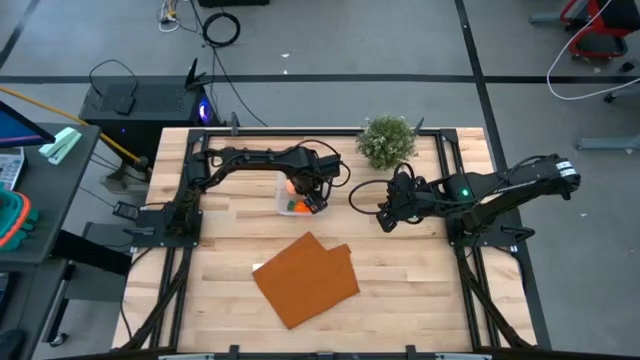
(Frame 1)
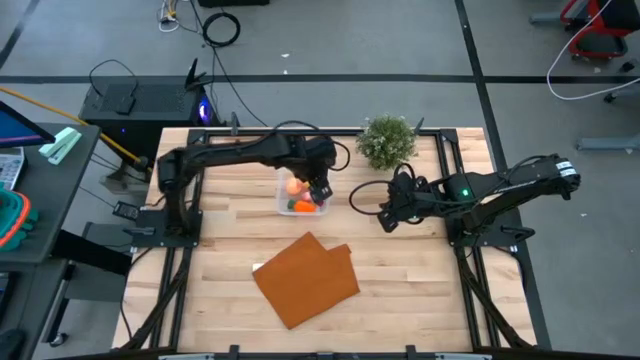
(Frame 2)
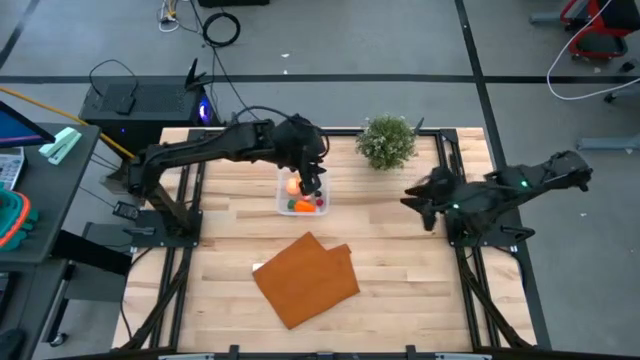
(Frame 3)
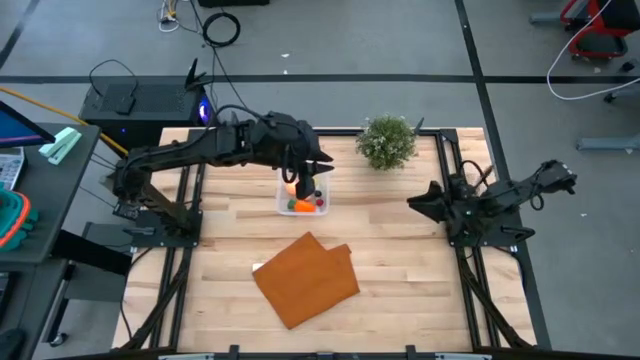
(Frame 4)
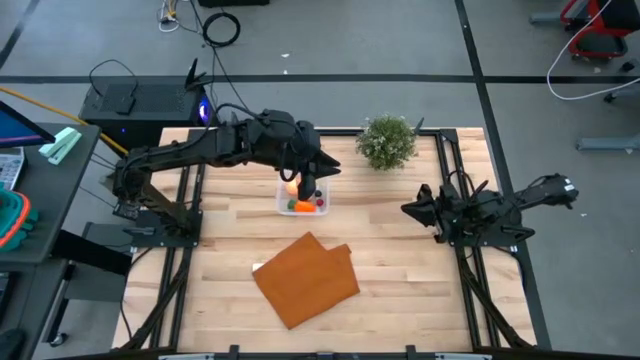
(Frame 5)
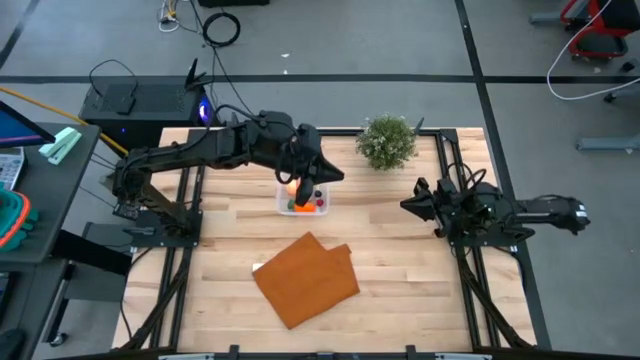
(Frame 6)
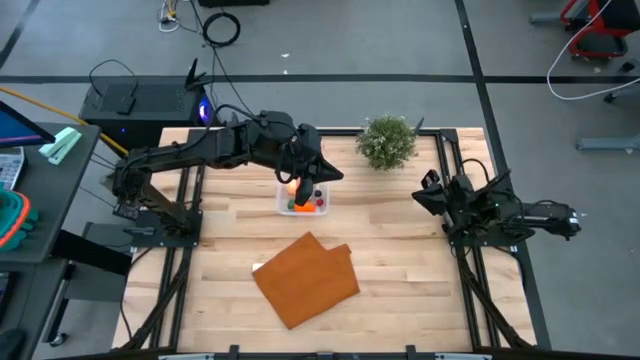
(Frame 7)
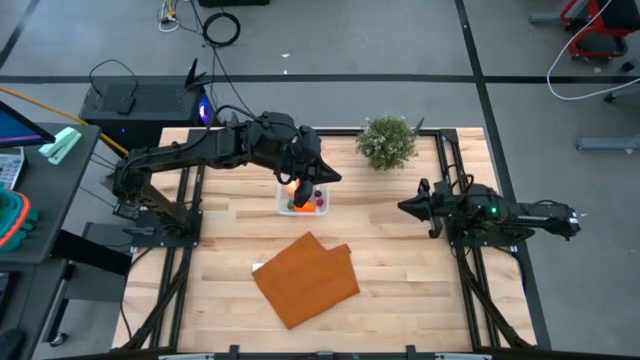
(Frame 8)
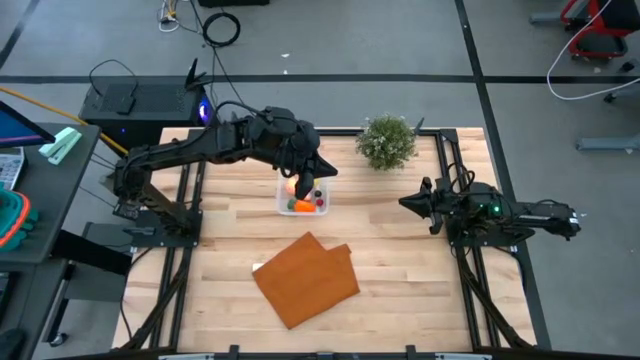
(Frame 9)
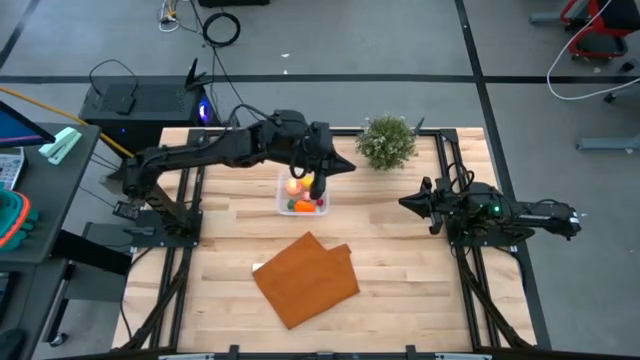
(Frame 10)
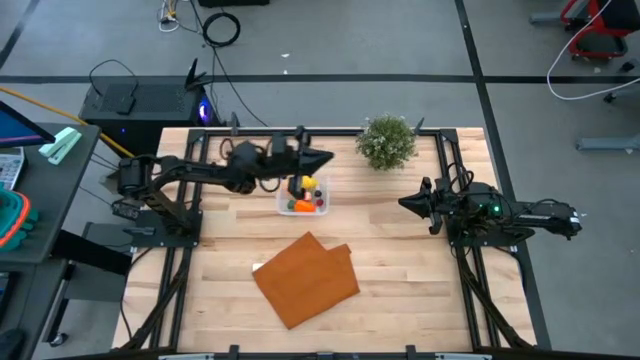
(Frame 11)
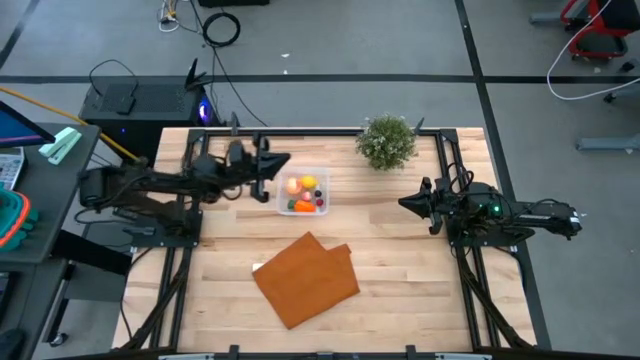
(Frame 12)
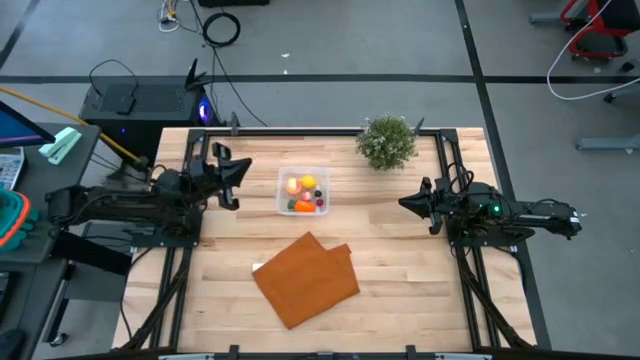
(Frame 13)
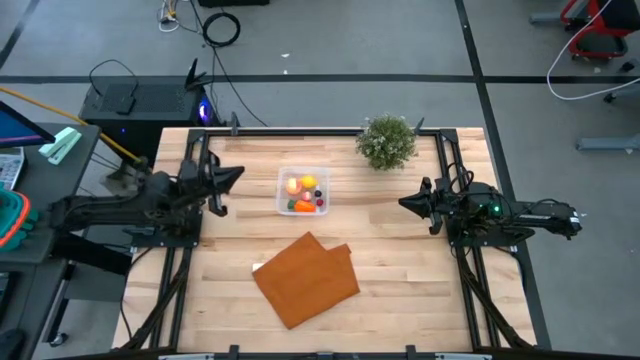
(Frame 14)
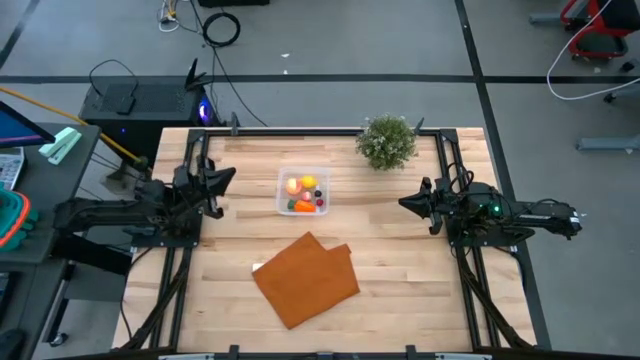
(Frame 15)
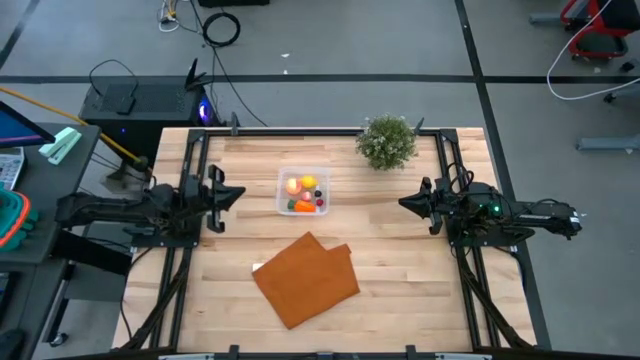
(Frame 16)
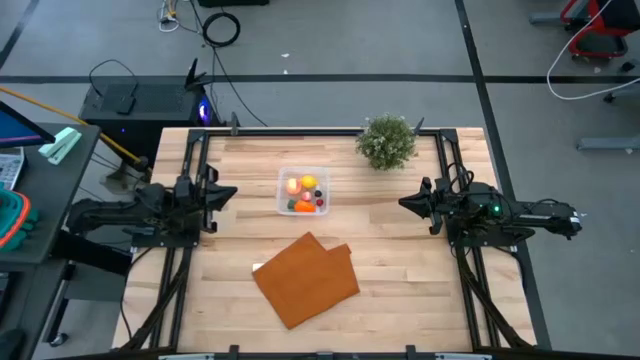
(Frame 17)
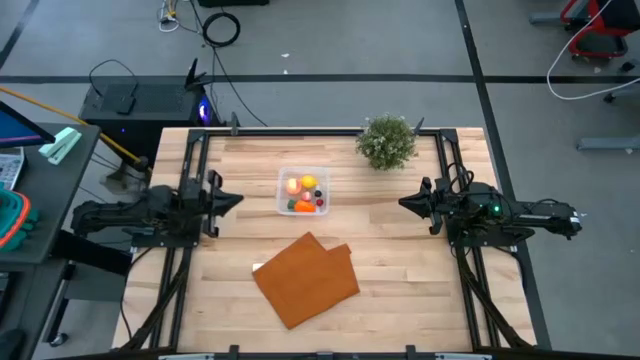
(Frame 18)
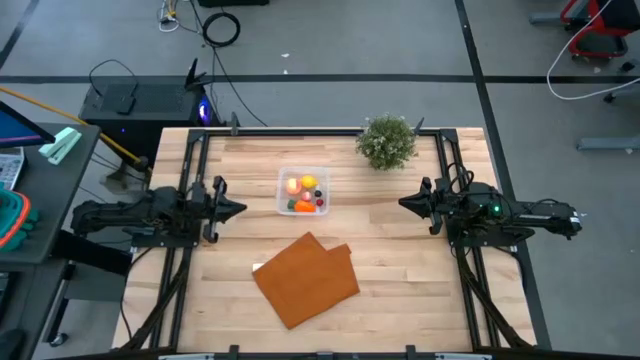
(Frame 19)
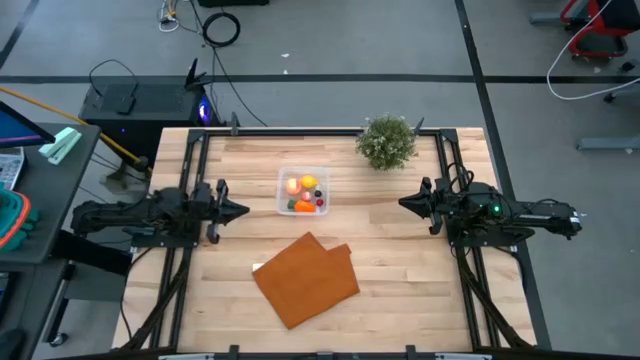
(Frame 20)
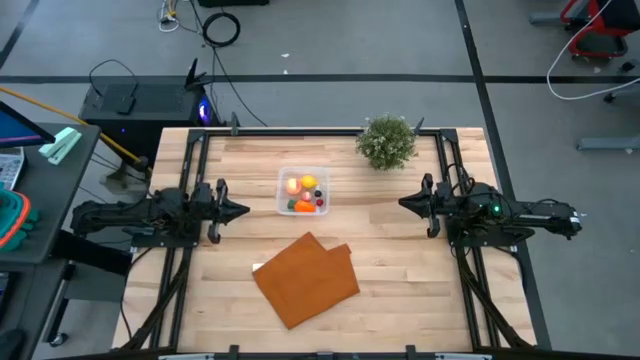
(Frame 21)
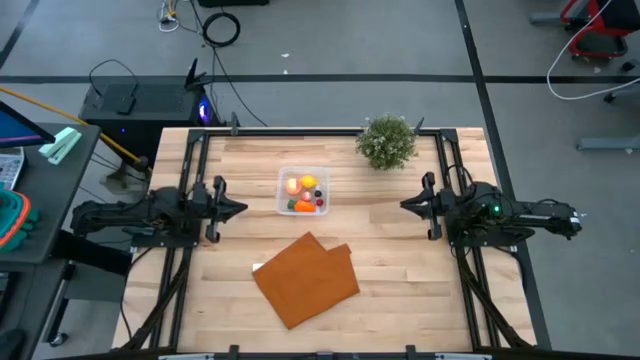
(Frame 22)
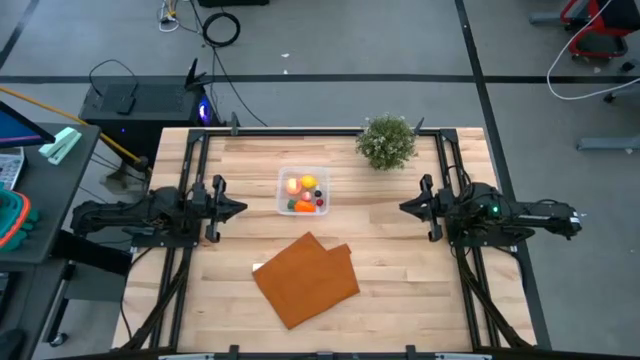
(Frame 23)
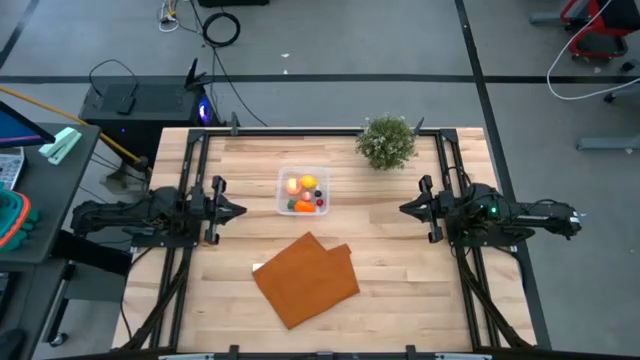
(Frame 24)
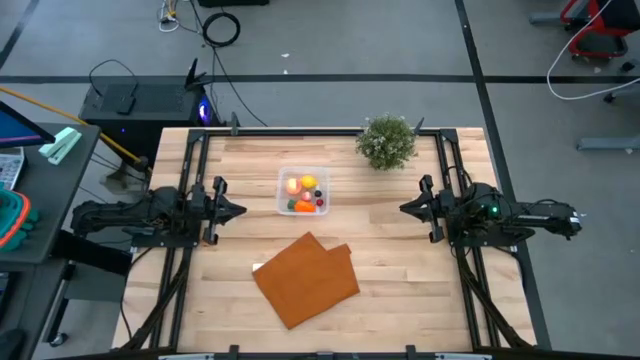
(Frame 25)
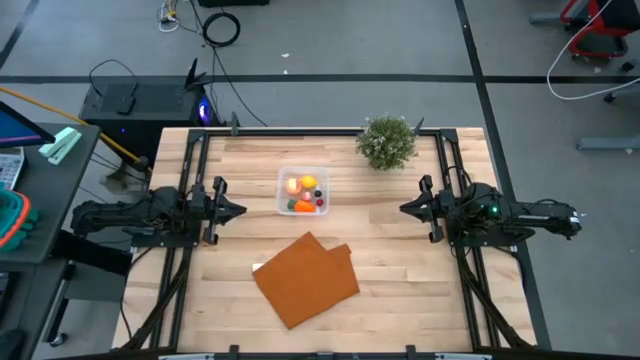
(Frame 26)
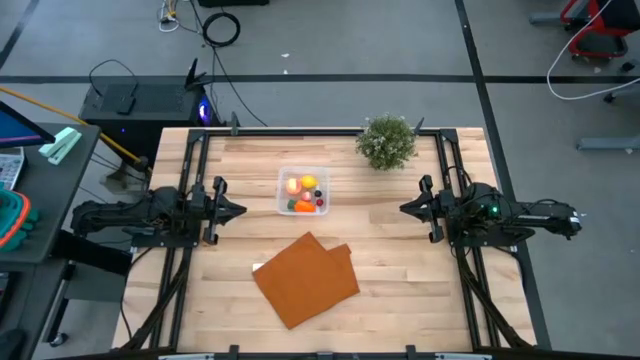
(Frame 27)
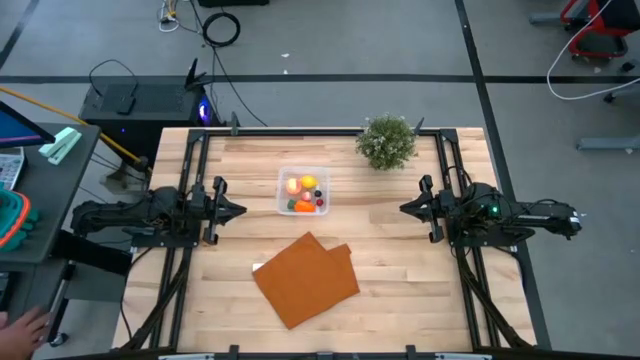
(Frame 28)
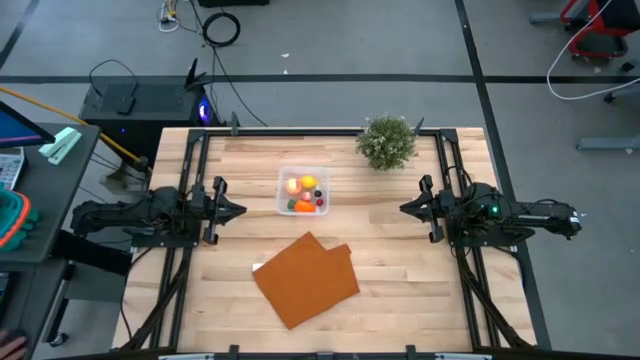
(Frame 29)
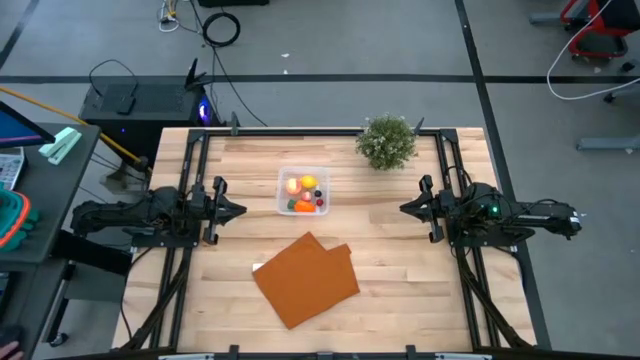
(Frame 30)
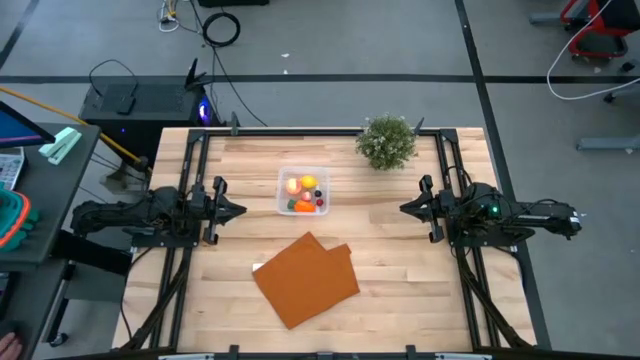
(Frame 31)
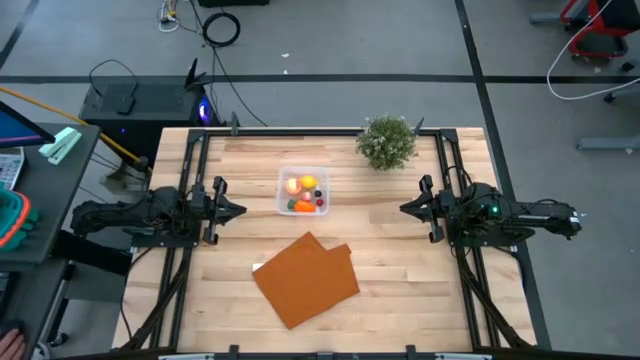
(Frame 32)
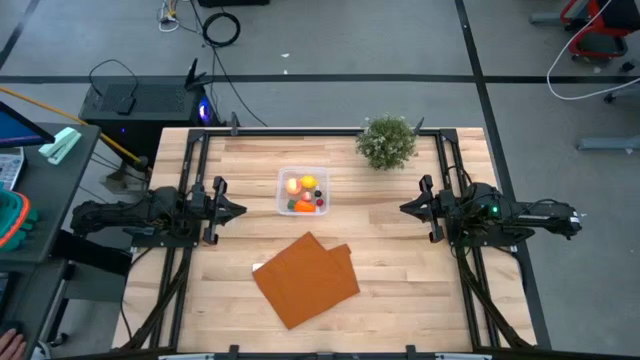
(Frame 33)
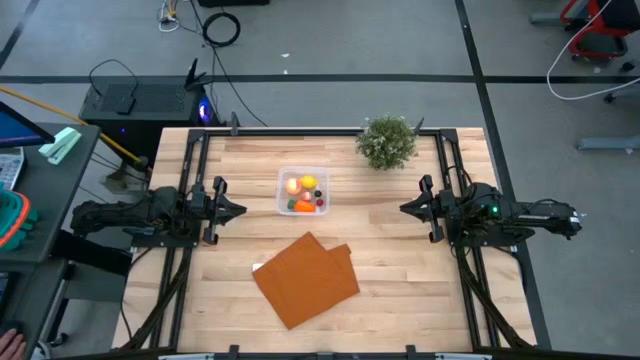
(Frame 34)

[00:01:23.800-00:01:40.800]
Task: Pick and placing Produce into tupperware
Return to Home Position

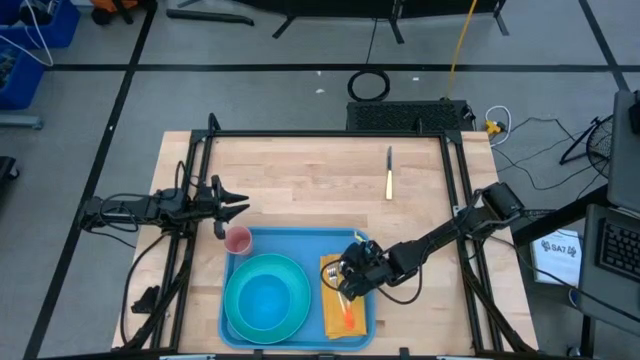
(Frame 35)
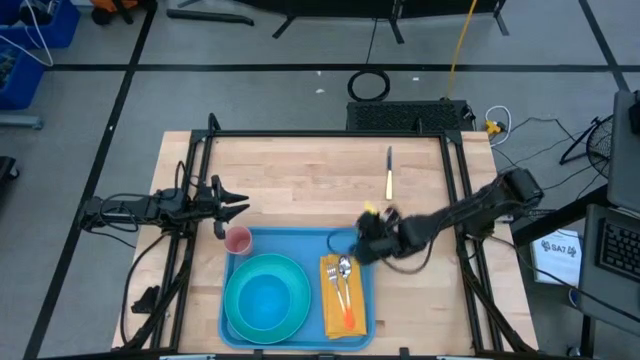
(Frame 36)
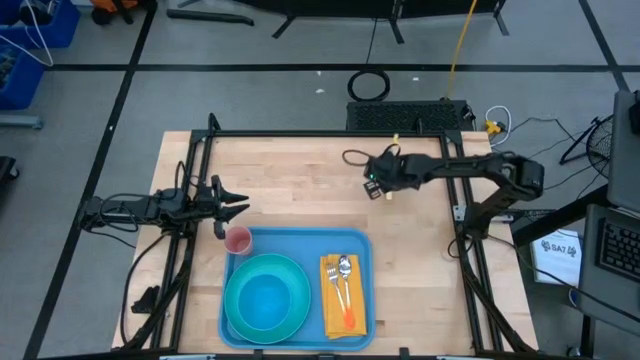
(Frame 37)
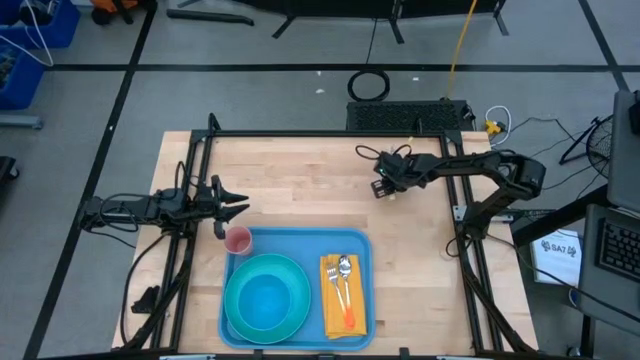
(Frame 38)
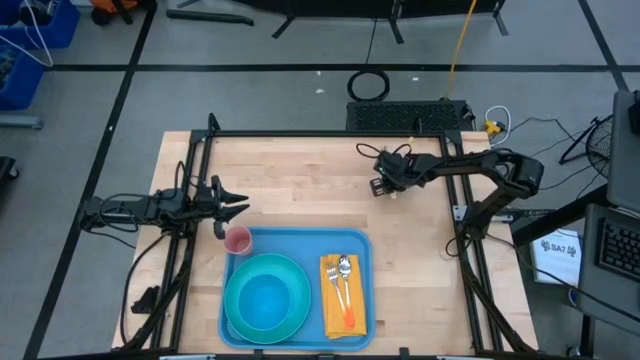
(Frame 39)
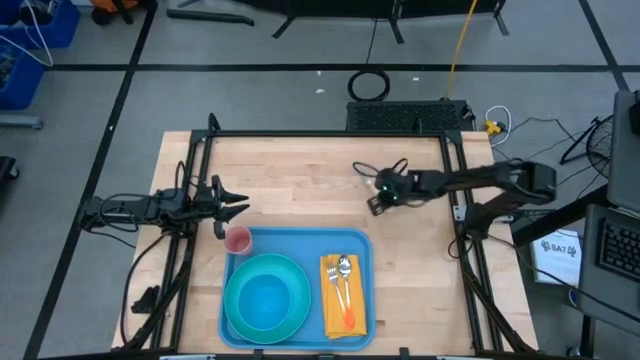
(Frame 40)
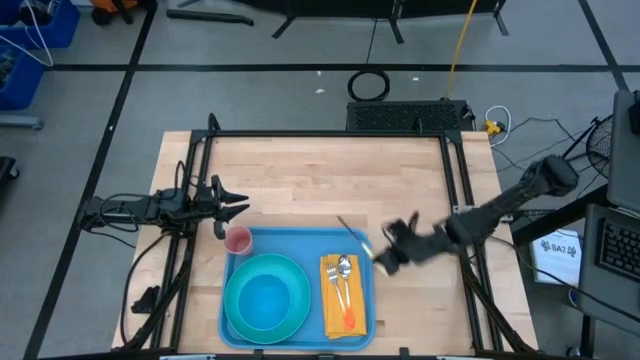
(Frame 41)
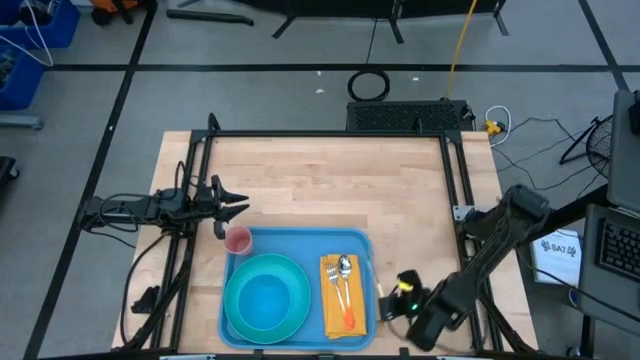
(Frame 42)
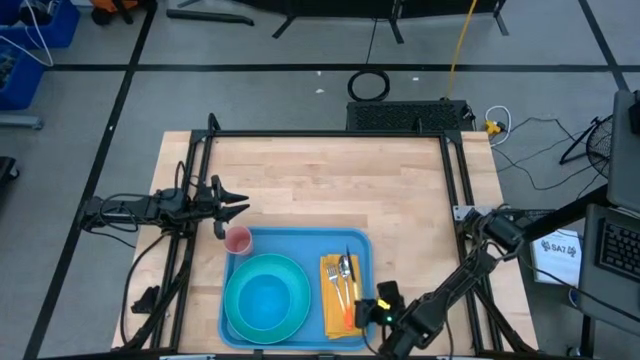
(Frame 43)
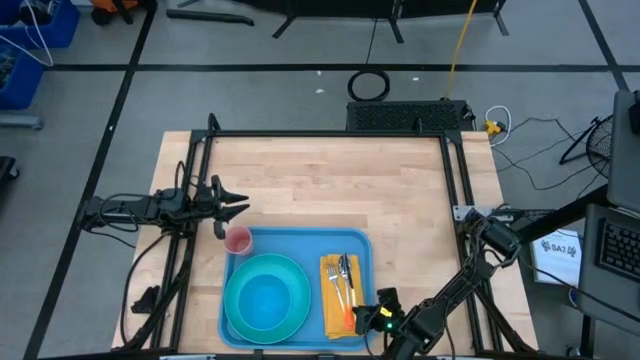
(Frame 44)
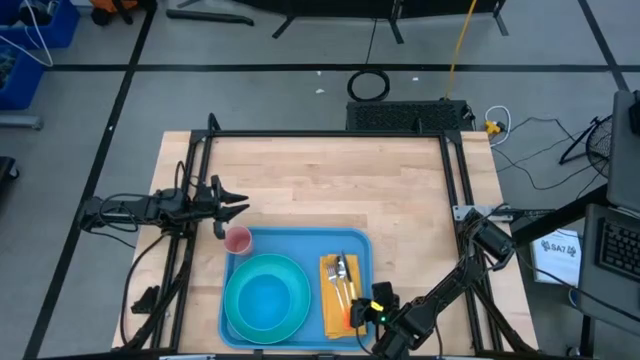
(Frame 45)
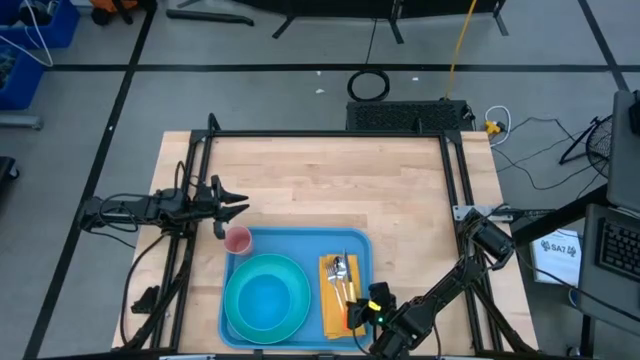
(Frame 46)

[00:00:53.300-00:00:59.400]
Task: Set up tray
Put the yellow knife on the yellow napkin to the right of the orange spoon
